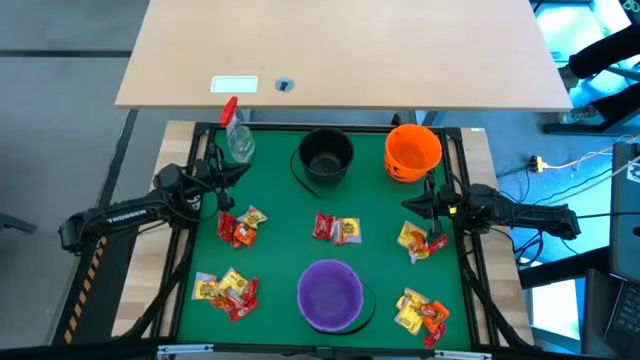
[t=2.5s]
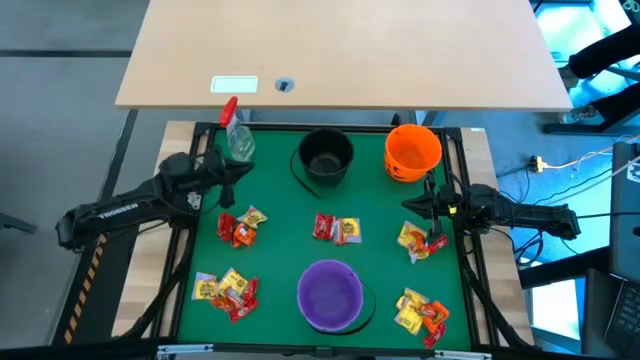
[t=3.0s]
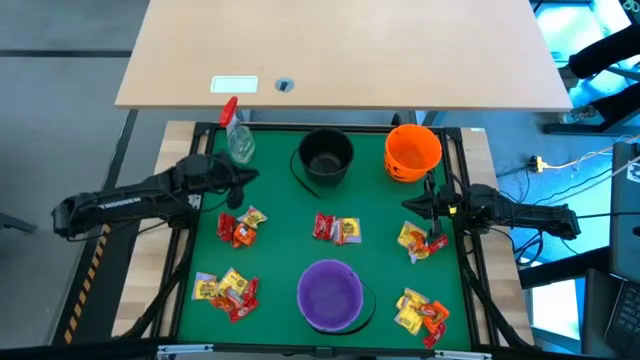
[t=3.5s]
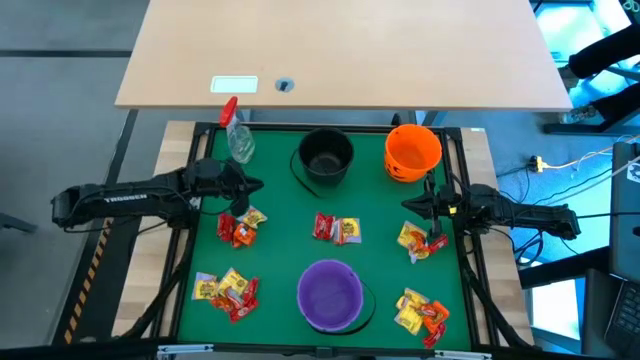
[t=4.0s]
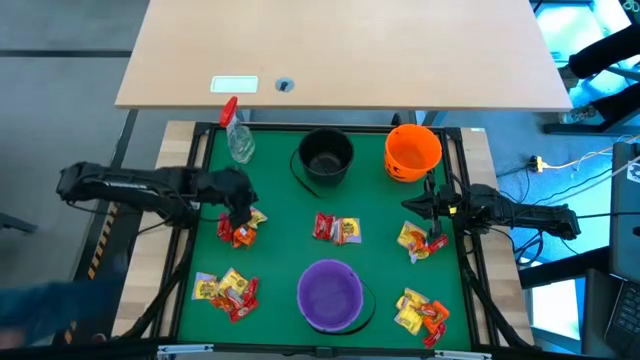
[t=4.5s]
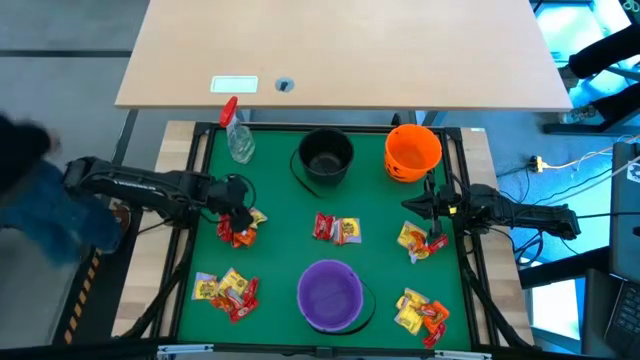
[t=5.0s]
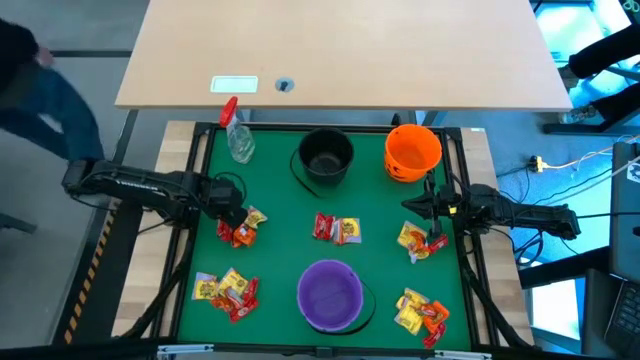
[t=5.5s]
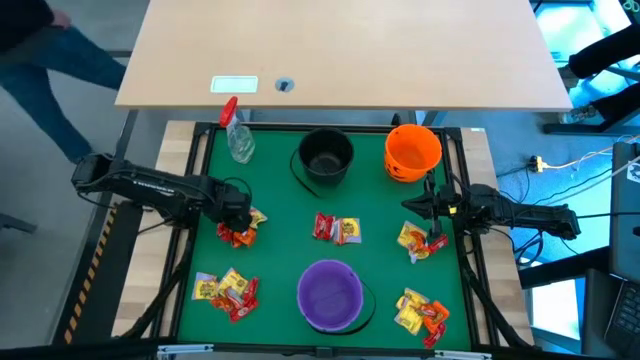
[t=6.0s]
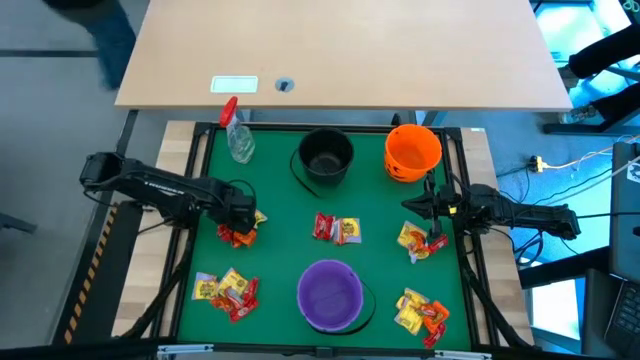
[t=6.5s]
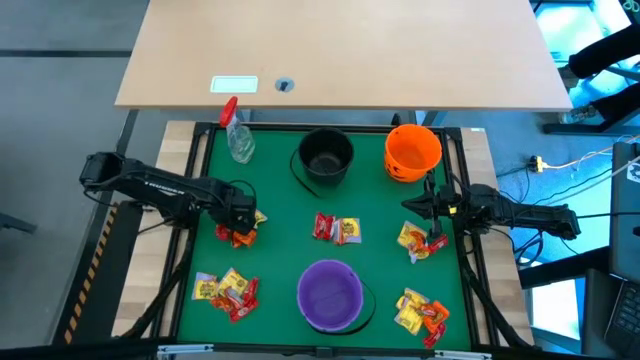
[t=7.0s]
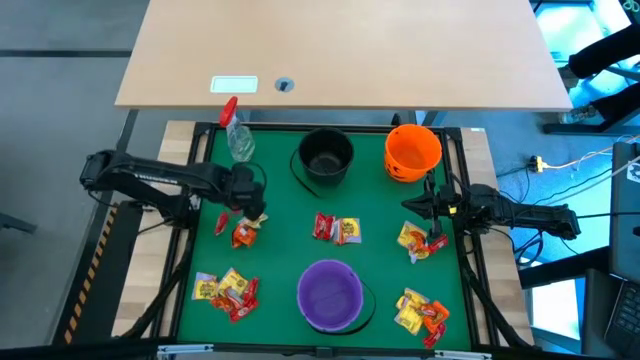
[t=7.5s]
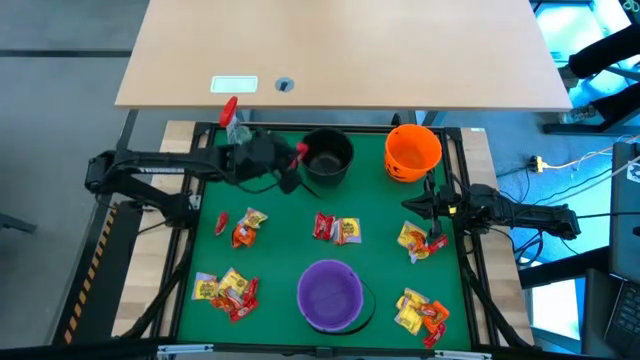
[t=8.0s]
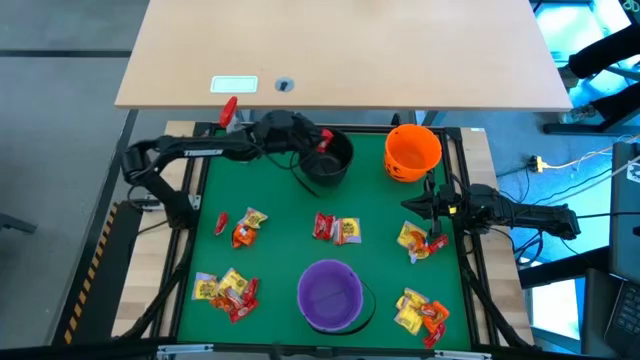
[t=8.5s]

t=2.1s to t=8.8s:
Task: Organize candy in baskets
Put the red candy pack into the black bucket

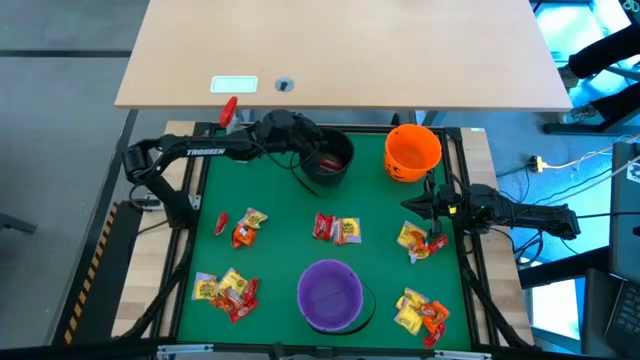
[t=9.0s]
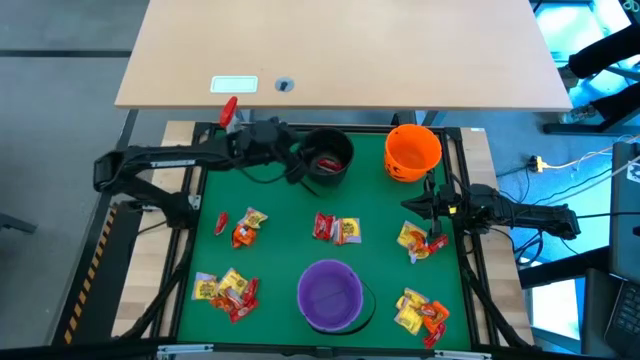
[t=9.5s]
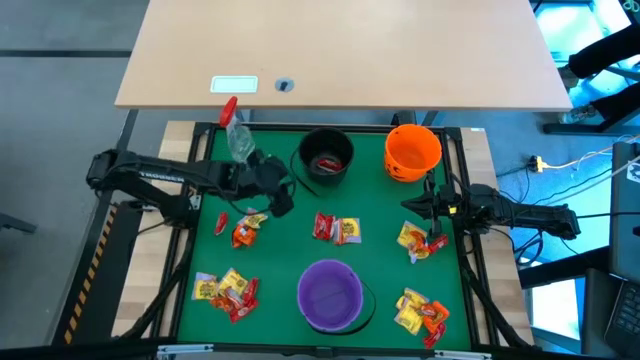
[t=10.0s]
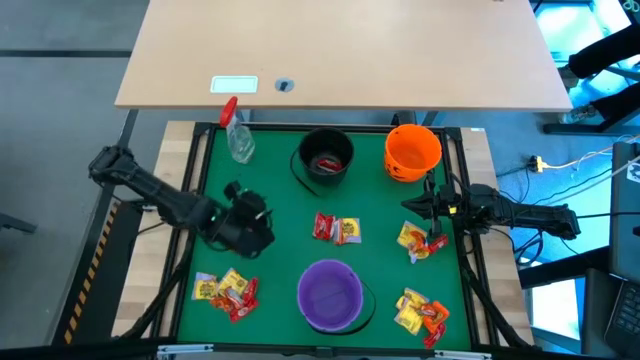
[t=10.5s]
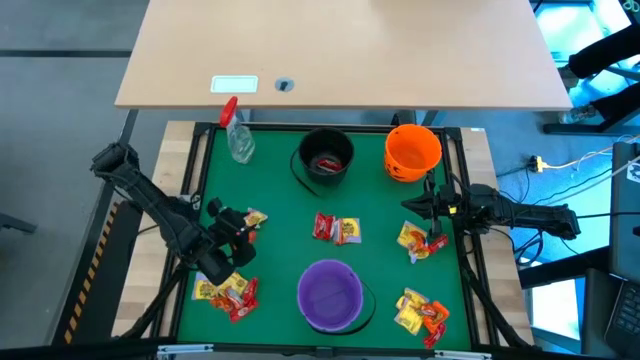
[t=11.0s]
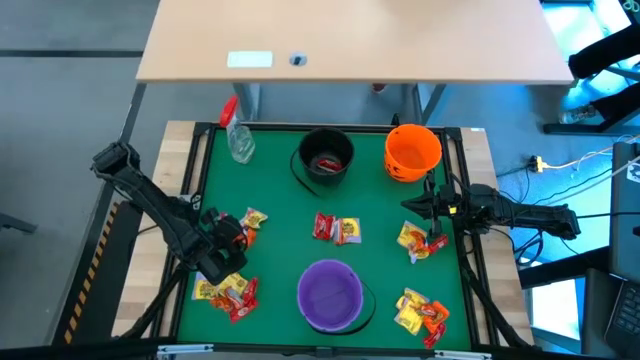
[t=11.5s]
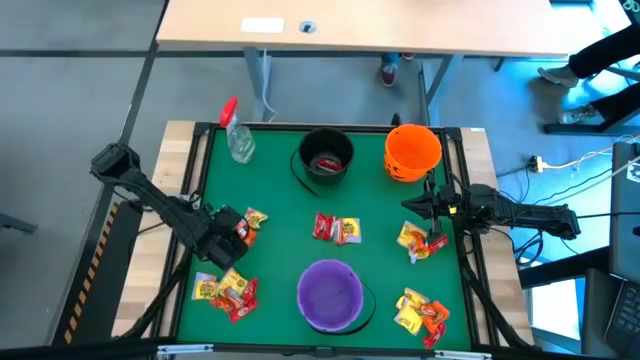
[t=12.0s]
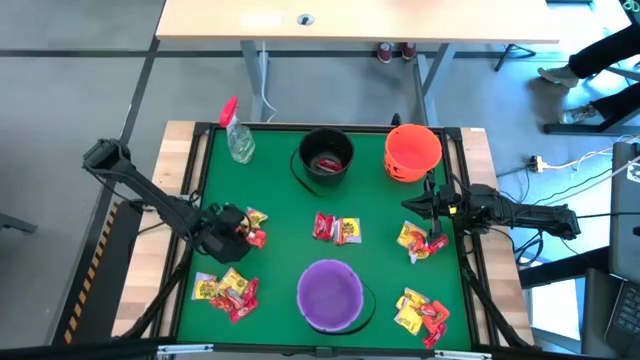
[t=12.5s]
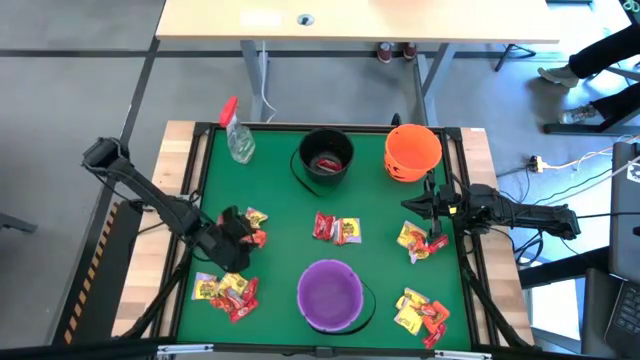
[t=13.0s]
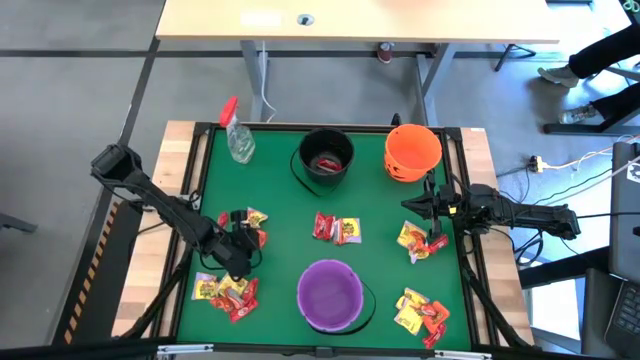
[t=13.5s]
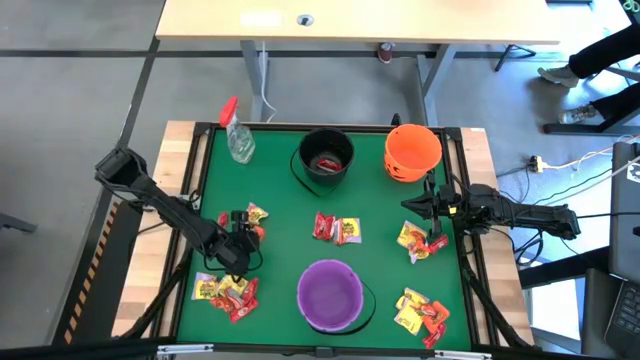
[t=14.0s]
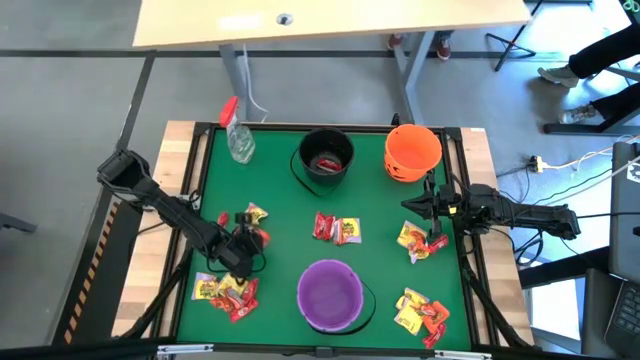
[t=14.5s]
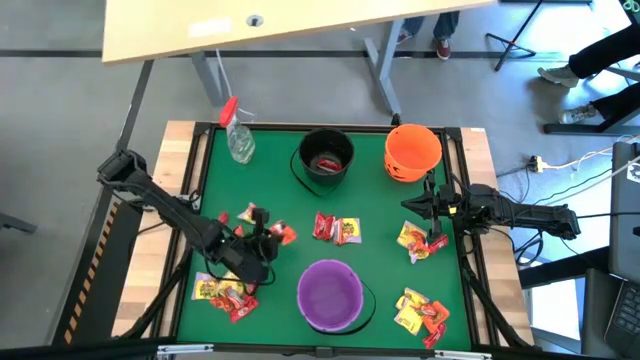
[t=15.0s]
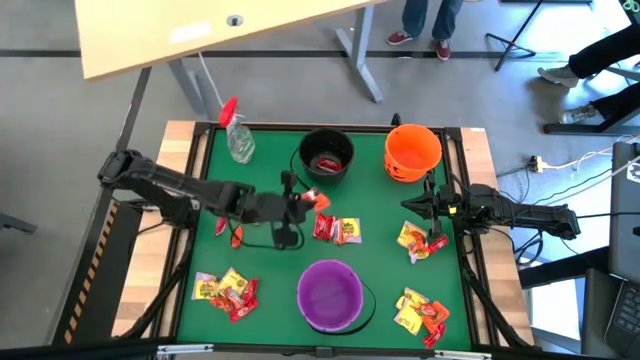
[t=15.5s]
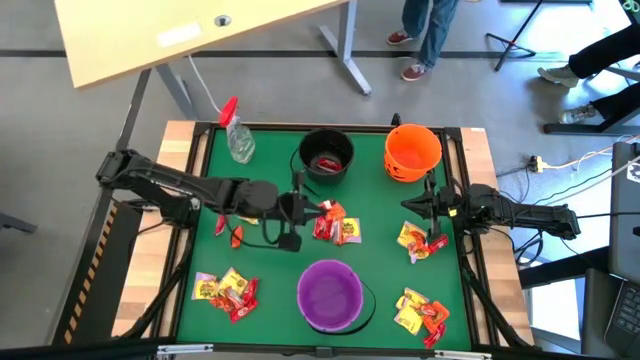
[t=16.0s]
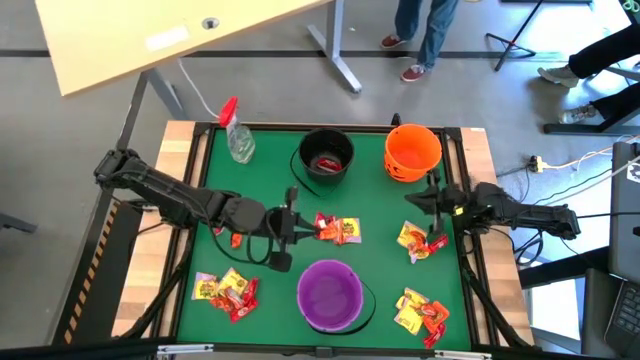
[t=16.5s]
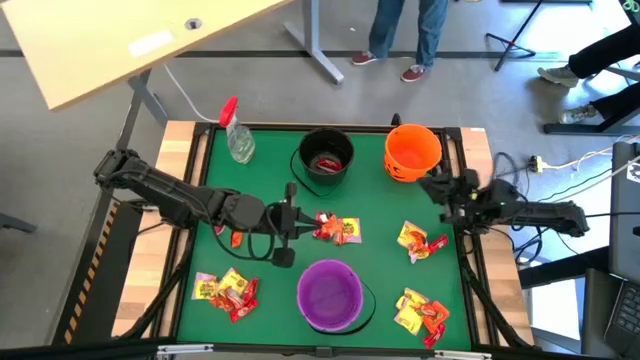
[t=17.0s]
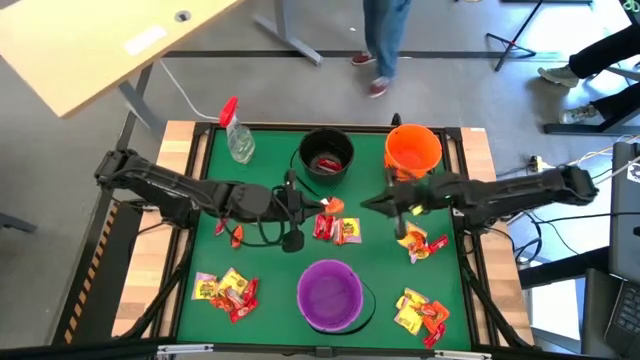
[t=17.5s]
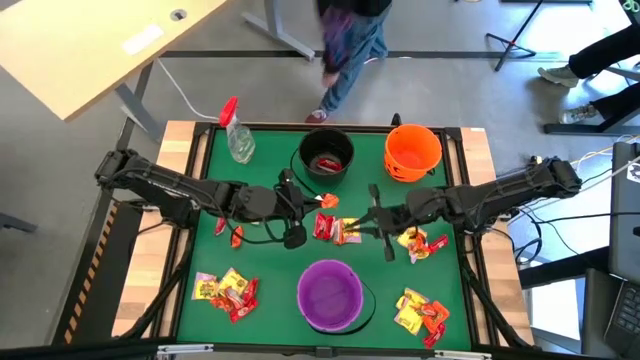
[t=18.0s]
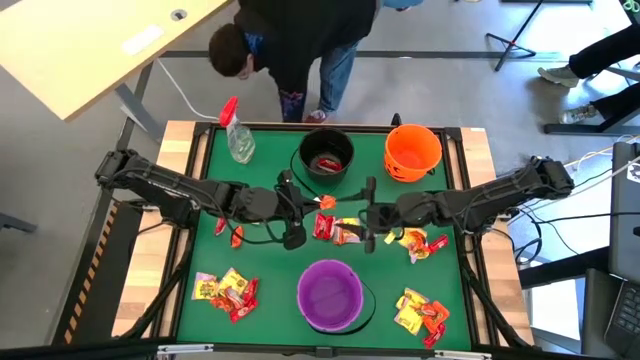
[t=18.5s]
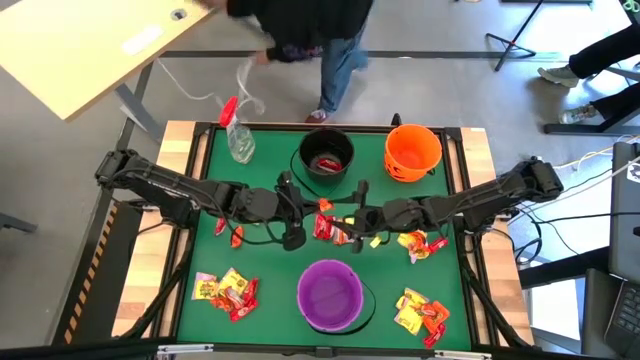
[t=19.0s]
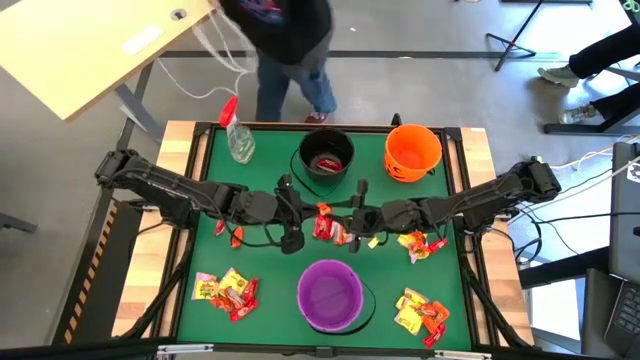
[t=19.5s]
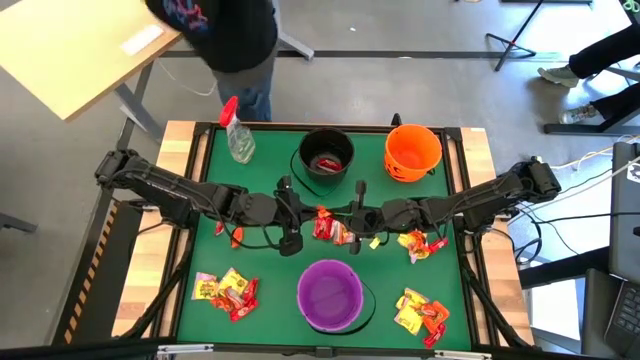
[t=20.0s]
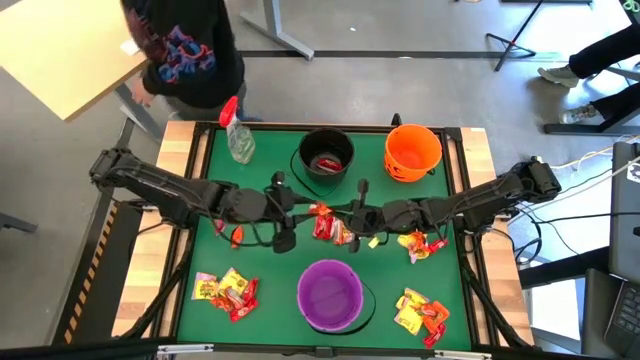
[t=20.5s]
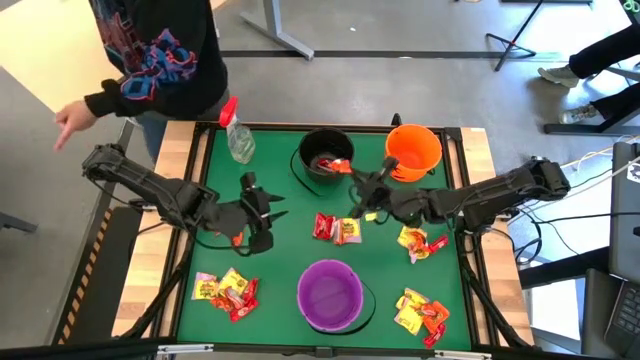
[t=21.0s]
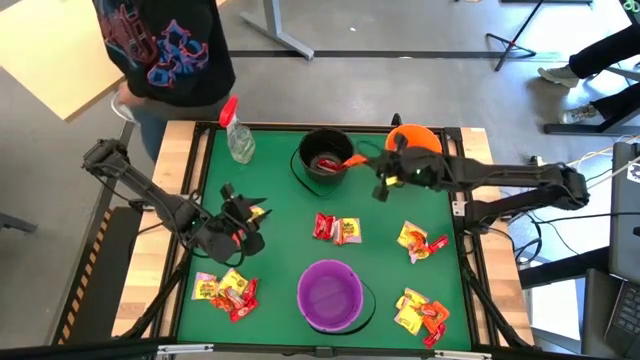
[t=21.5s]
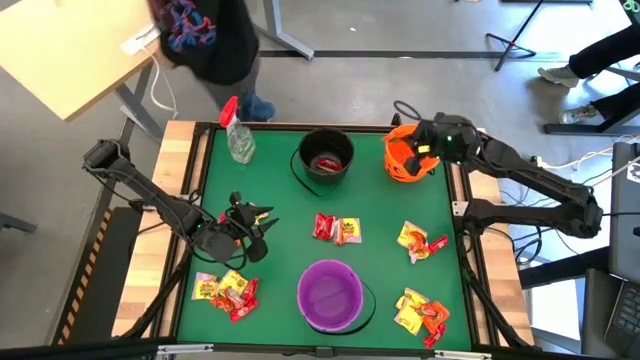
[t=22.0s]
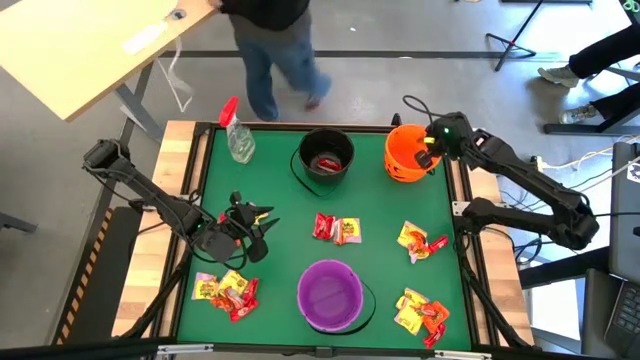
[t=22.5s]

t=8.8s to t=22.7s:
Put the orange candy pack into the orange bucket
